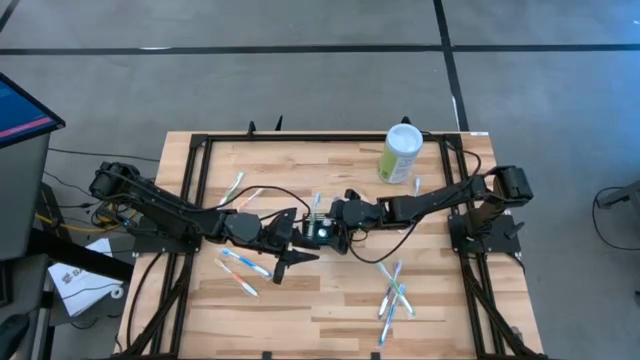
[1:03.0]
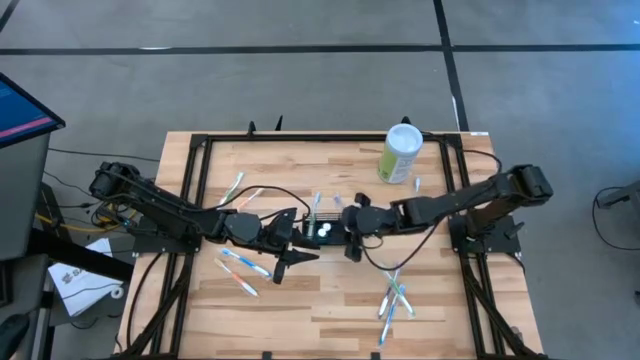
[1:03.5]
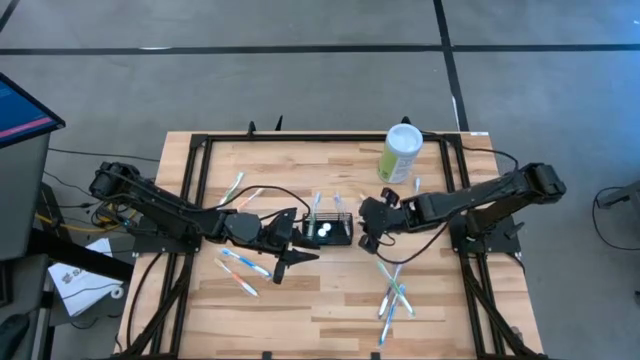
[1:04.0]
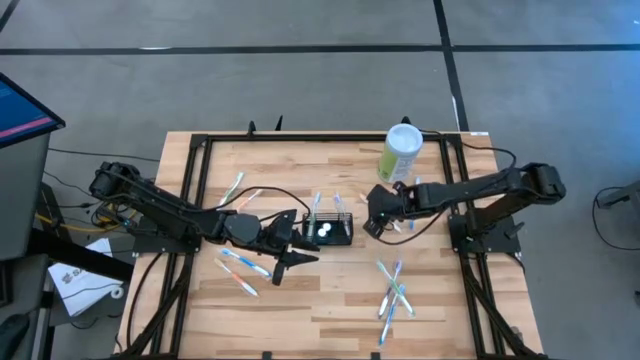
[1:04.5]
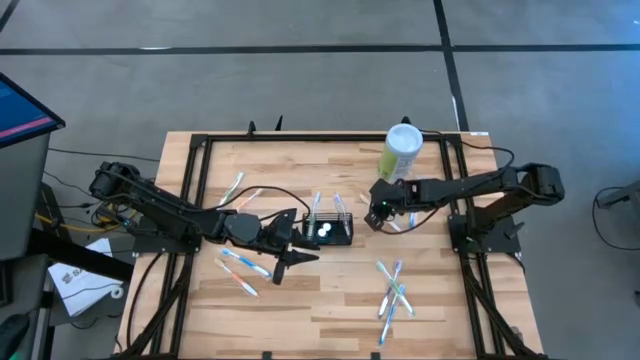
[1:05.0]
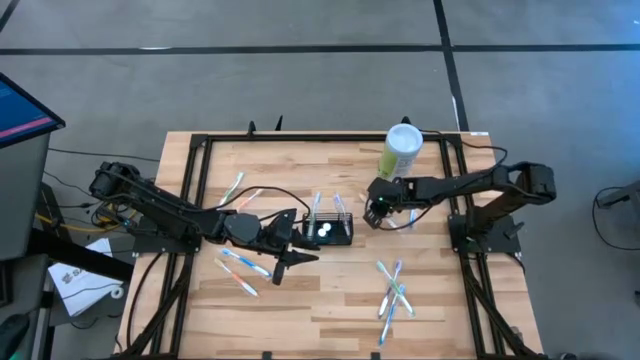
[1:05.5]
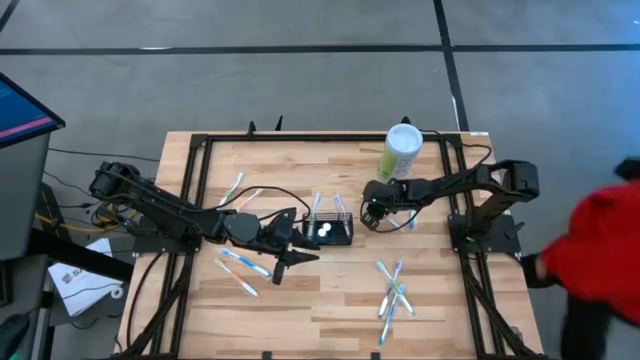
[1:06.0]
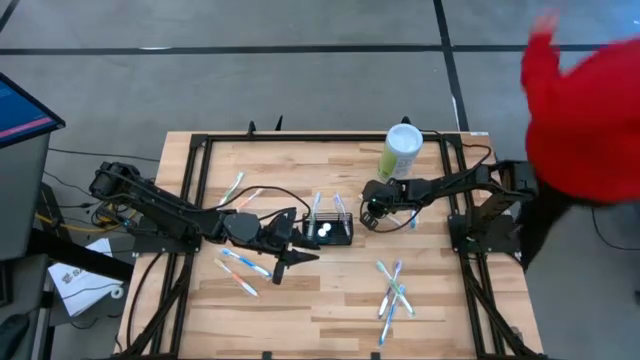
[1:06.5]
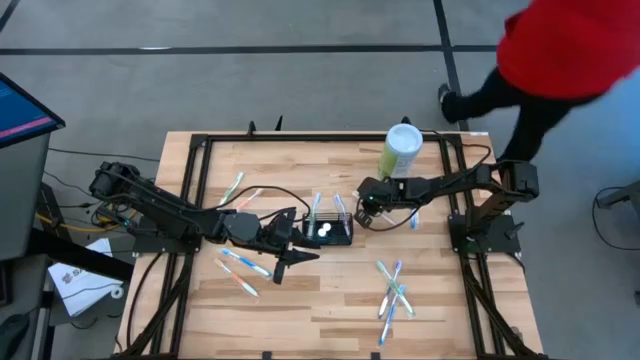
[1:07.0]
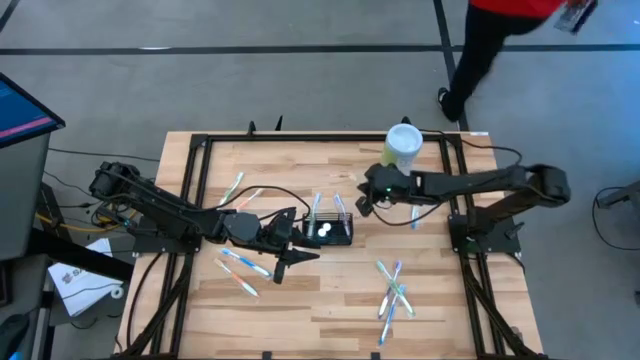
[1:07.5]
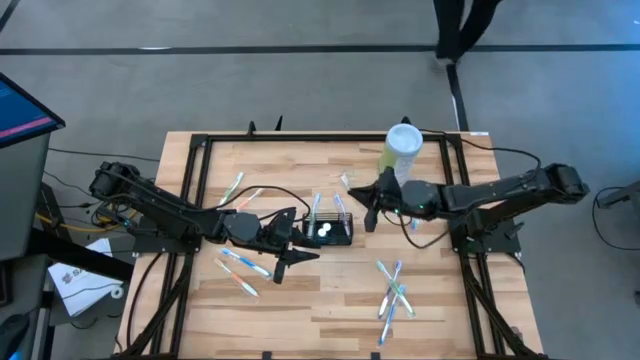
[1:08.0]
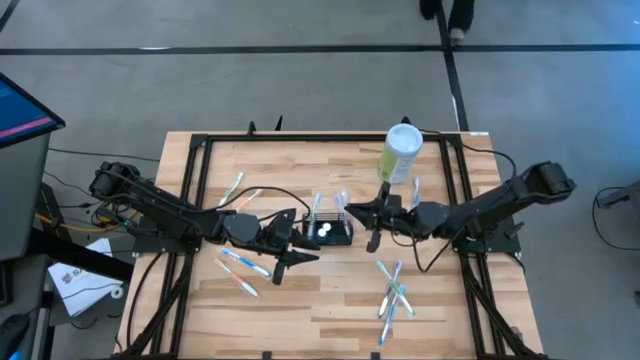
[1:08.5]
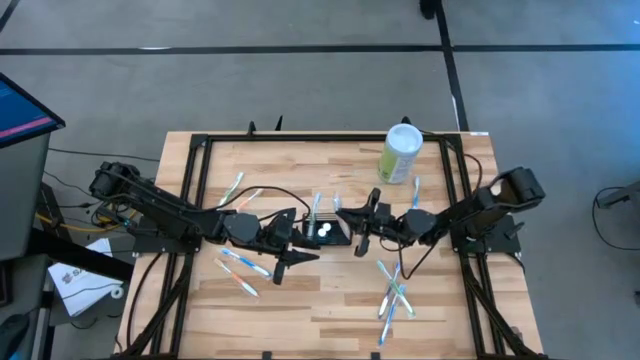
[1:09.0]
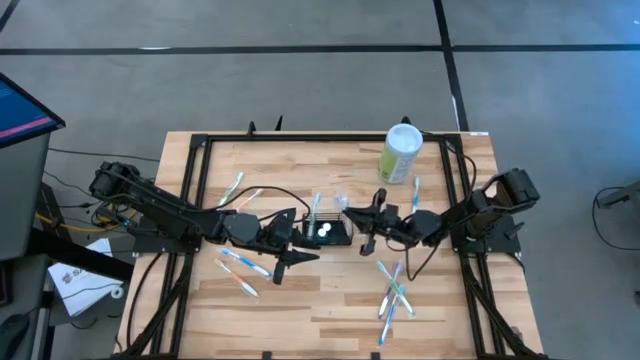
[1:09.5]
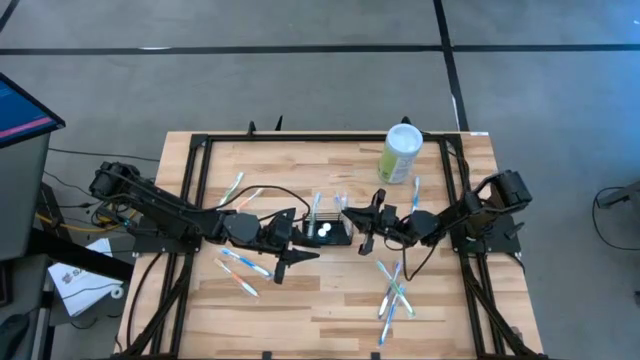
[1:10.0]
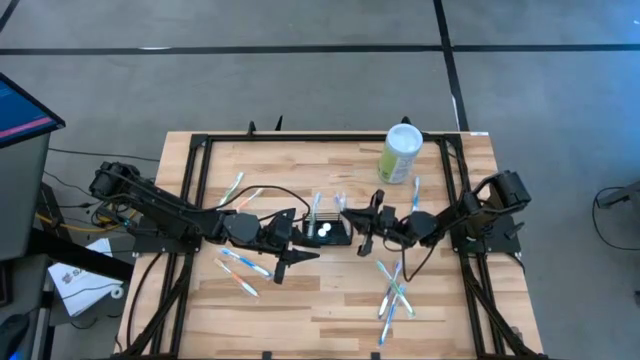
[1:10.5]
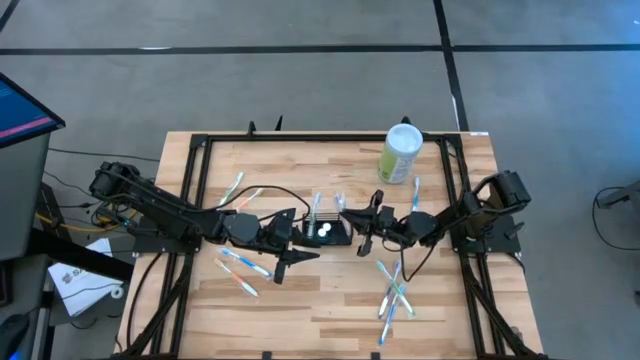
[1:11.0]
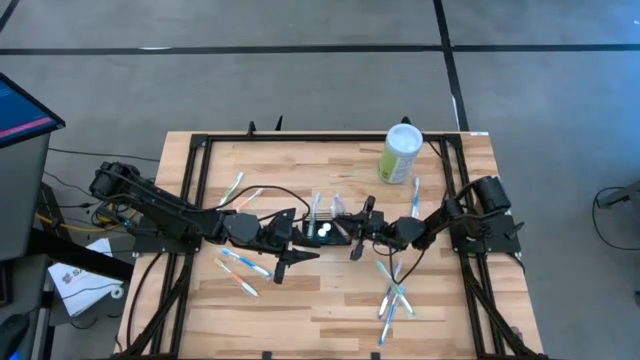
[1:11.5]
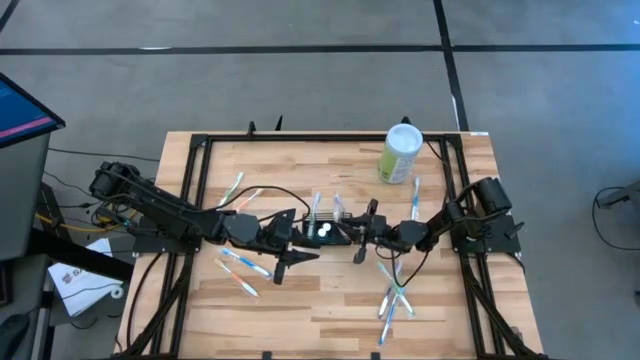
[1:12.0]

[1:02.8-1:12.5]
Task: Pick & Place toothbrushing station
Put the top right orange toothbrush into the right compartment of the organizer

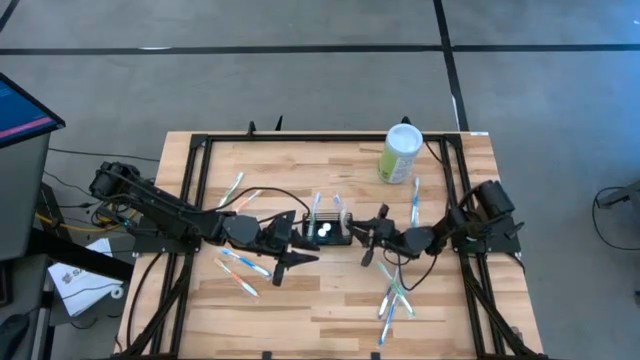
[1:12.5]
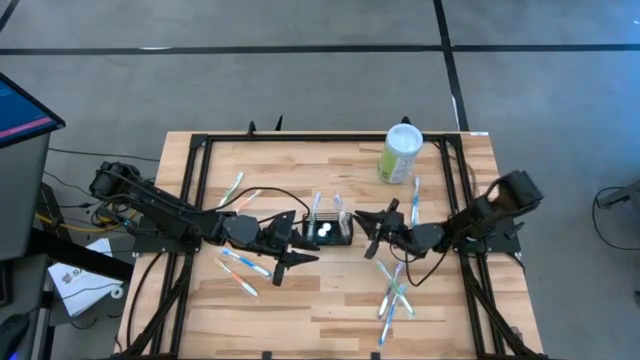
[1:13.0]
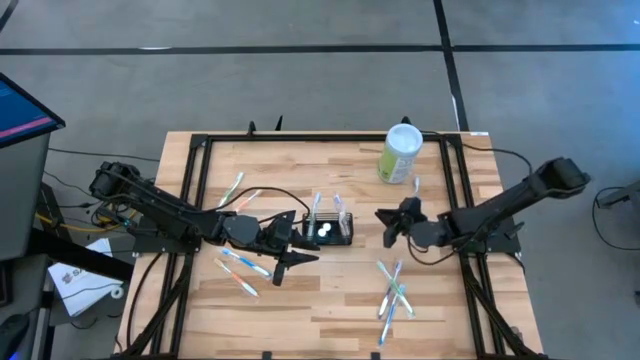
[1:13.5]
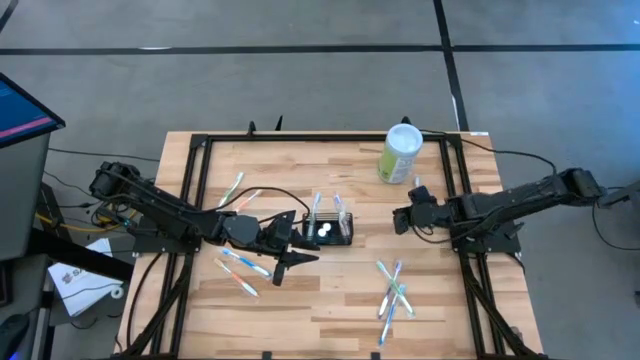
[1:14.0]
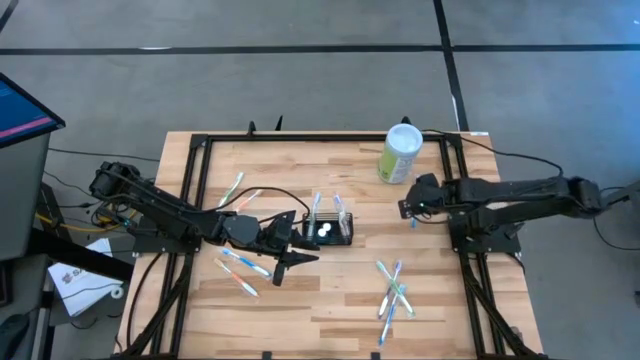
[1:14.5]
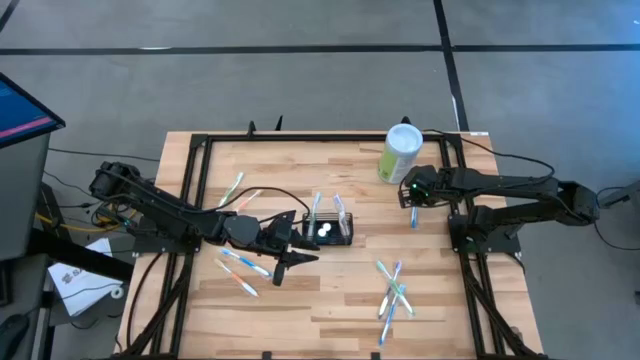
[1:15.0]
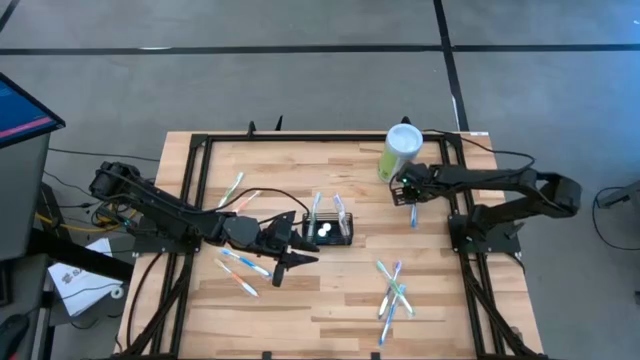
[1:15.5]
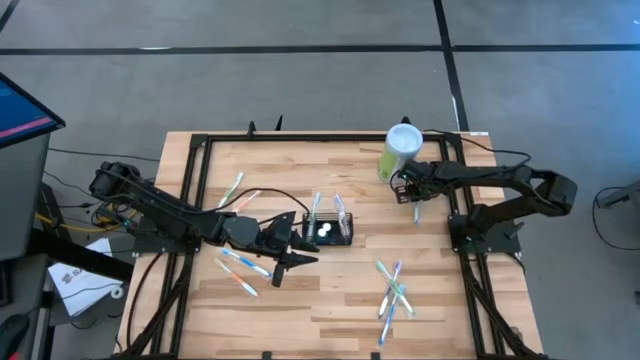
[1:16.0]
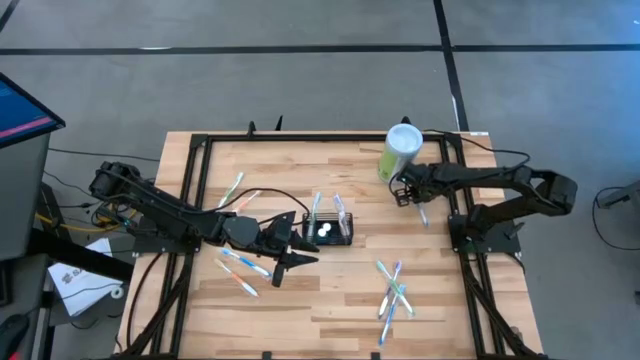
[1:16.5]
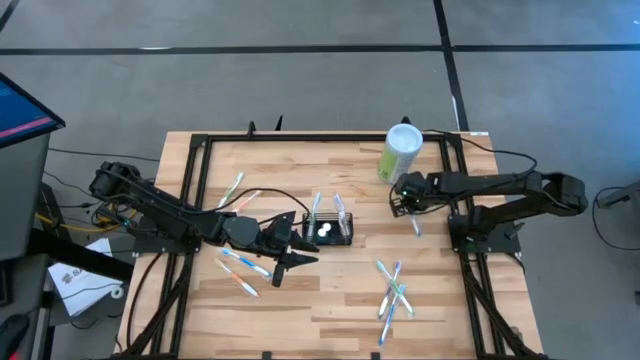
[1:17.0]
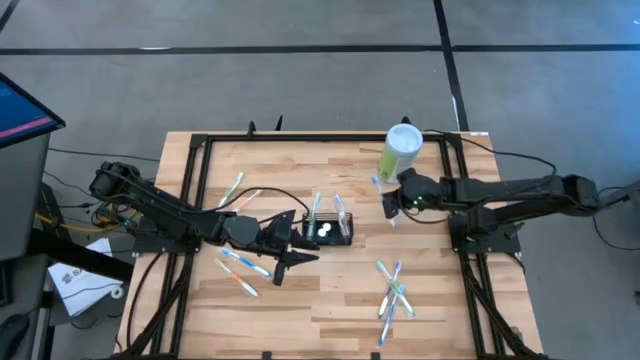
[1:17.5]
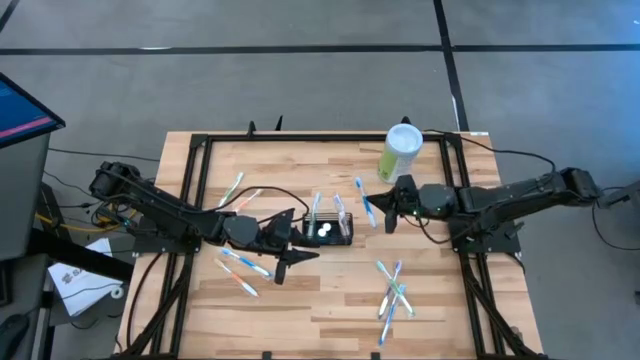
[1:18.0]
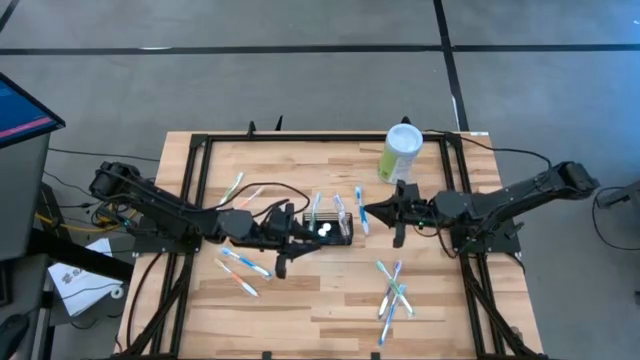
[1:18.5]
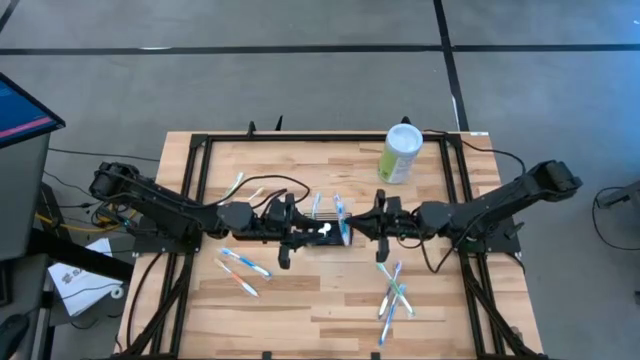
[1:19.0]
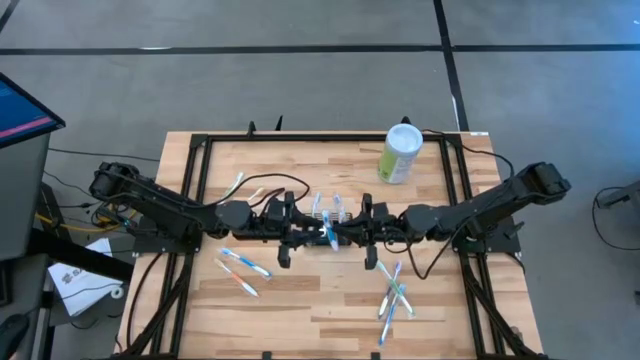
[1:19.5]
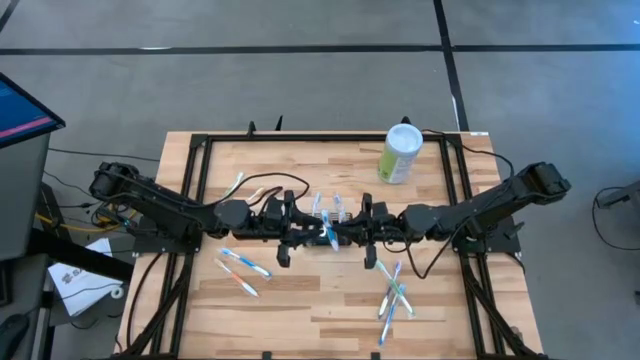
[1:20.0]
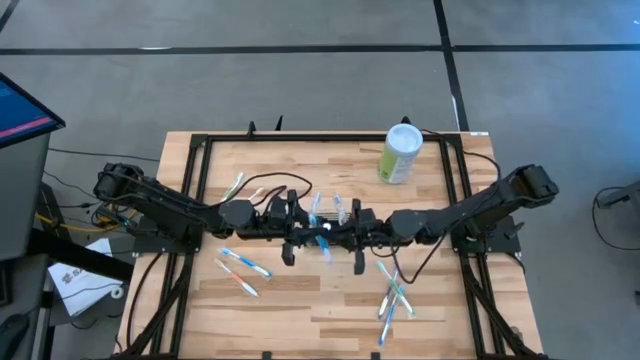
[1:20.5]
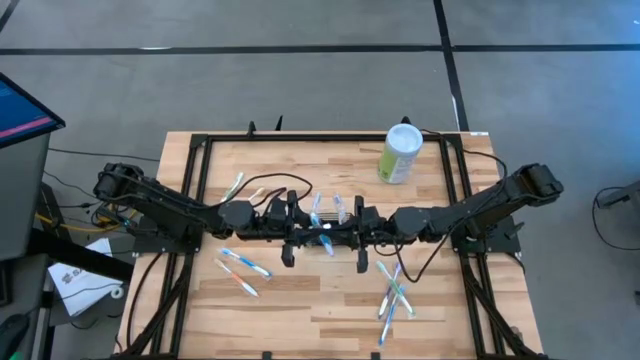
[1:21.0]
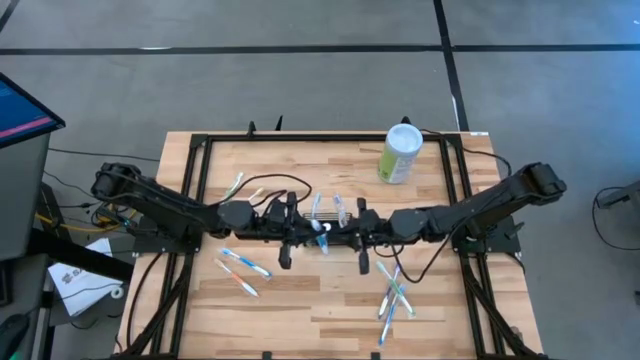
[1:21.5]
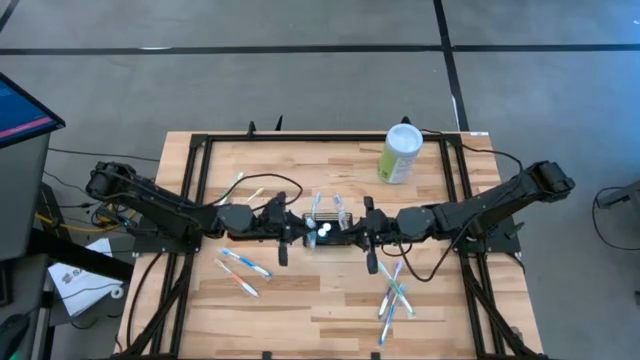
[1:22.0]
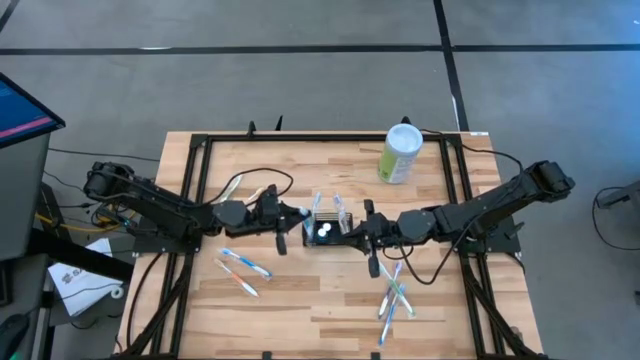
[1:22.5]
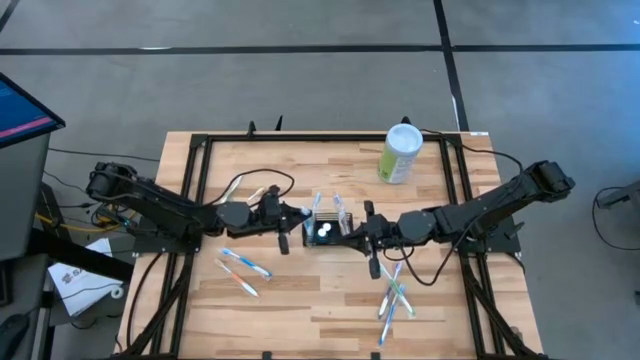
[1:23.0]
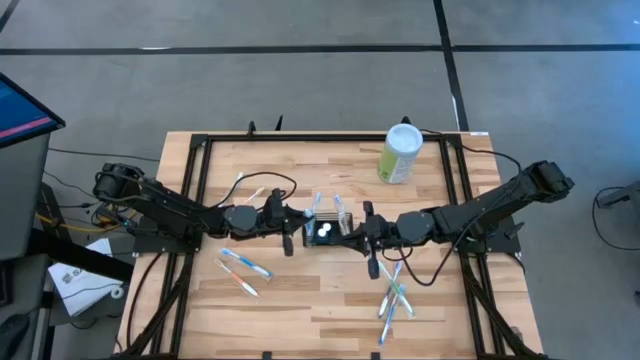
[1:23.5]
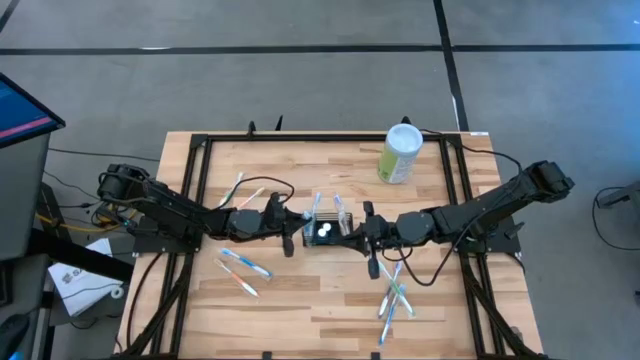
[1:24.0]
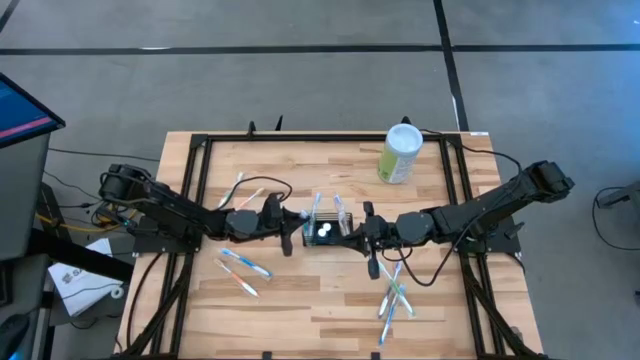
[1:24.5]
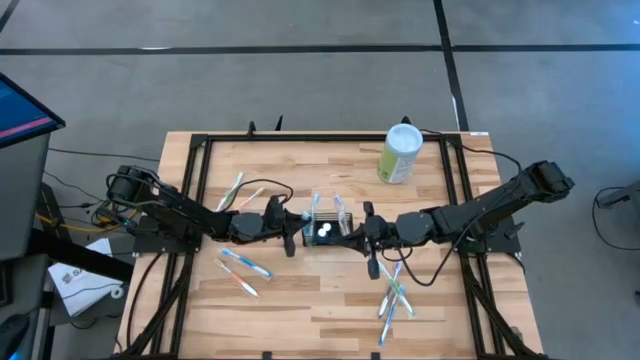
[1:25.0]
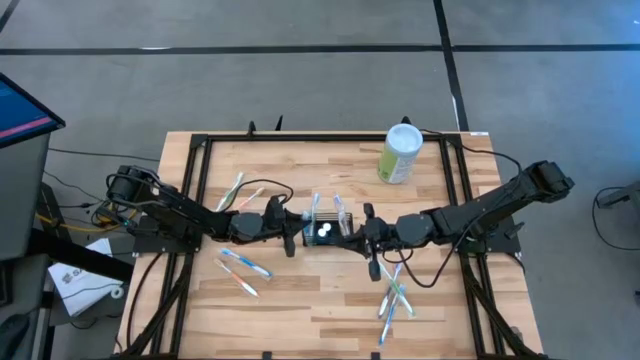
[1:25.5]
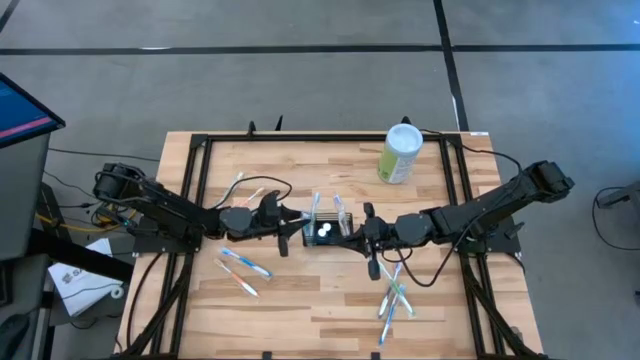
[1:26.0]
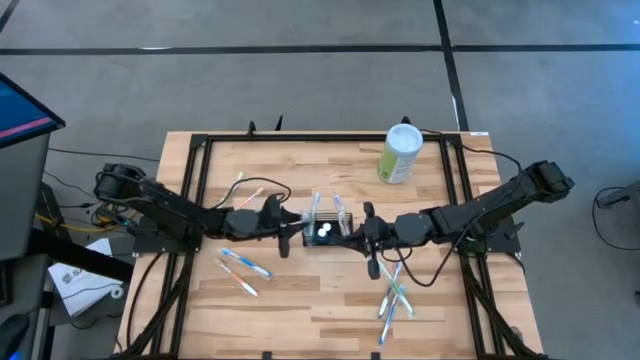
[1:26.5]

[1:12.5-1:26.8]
Put the top blue toothbrush into the left compartment of the organizer
